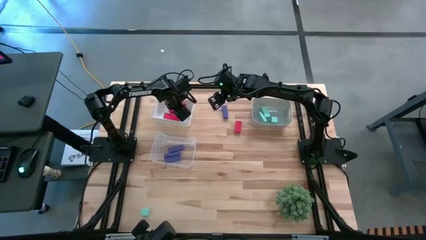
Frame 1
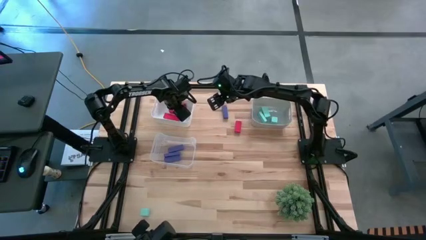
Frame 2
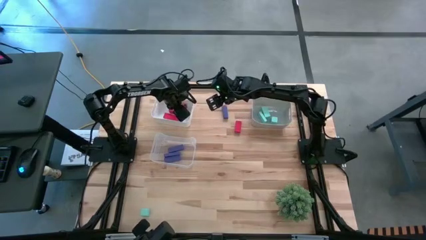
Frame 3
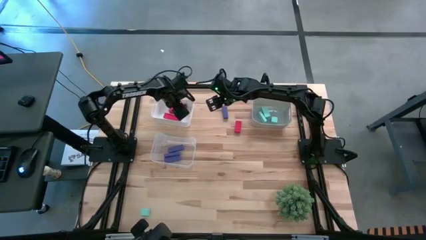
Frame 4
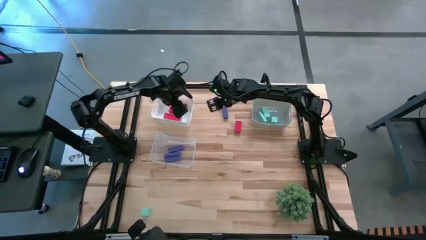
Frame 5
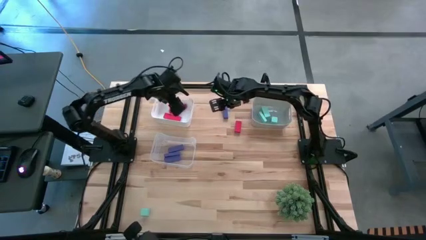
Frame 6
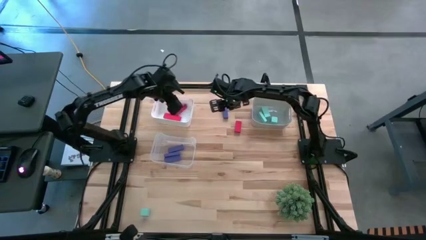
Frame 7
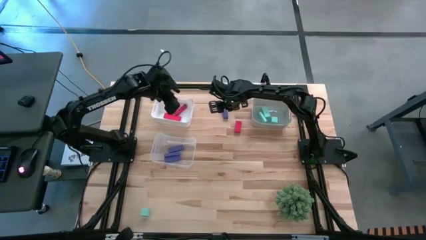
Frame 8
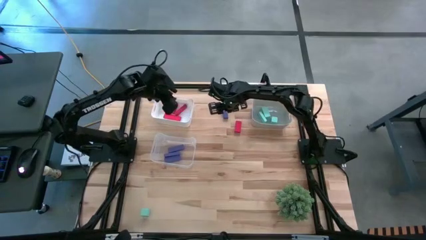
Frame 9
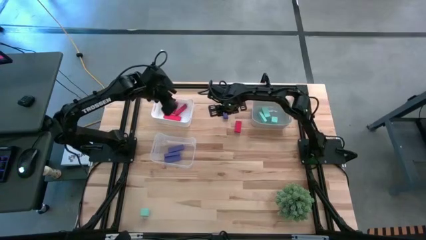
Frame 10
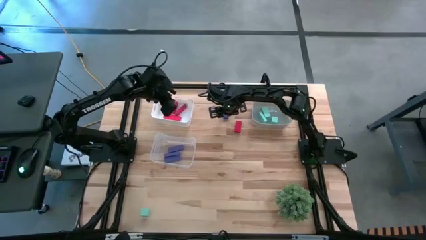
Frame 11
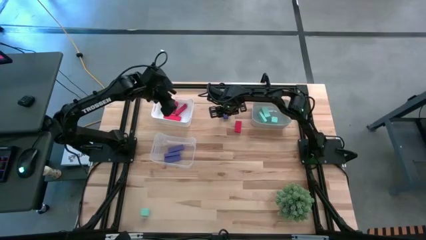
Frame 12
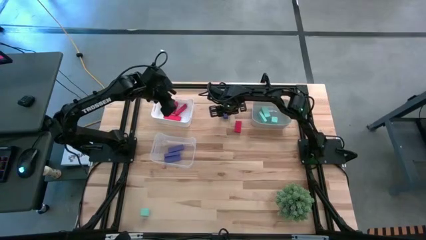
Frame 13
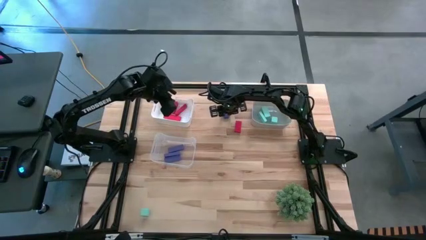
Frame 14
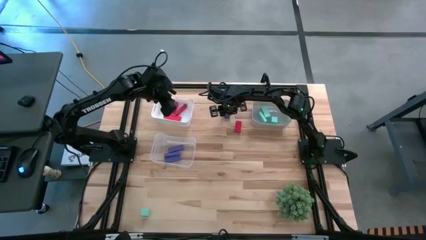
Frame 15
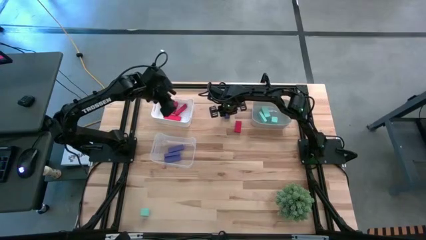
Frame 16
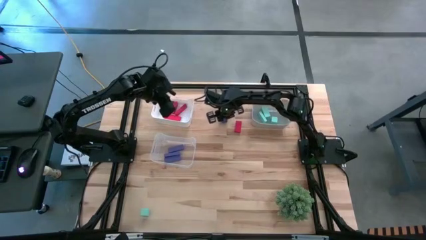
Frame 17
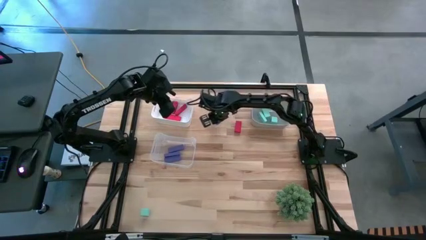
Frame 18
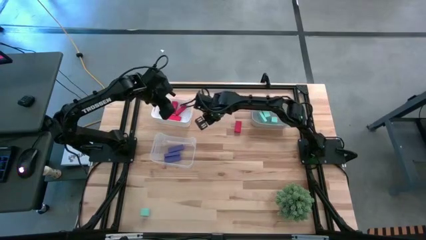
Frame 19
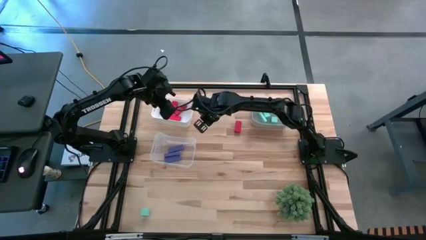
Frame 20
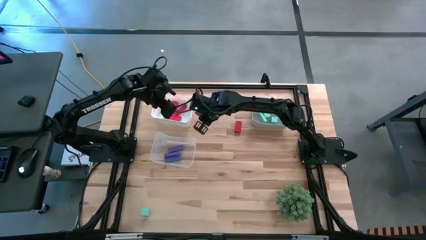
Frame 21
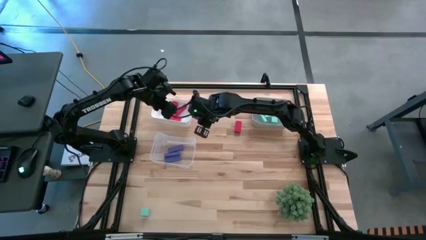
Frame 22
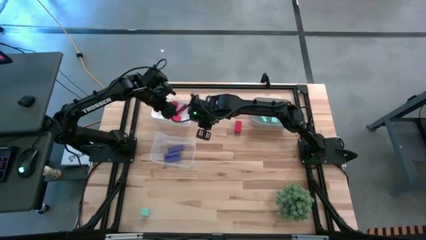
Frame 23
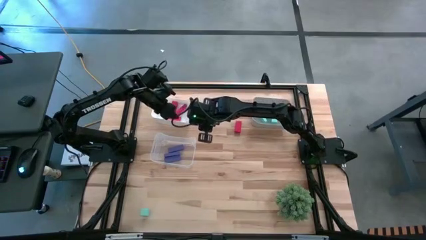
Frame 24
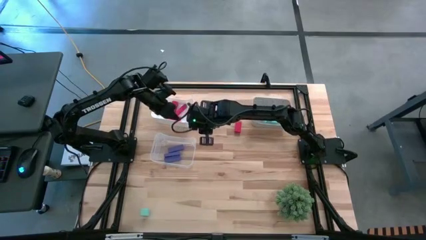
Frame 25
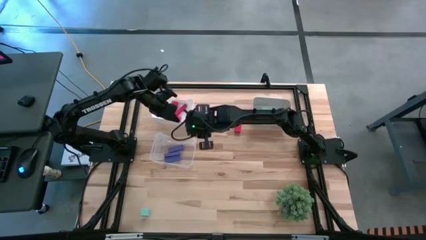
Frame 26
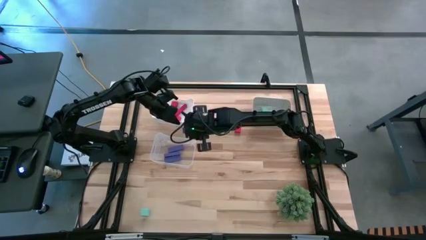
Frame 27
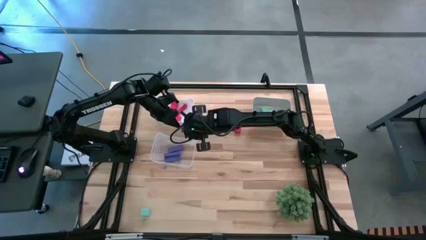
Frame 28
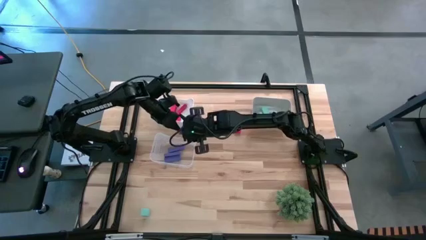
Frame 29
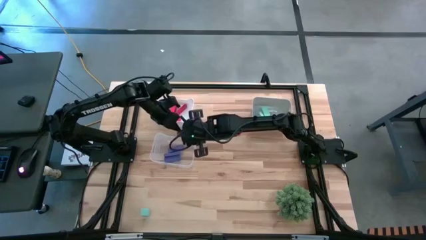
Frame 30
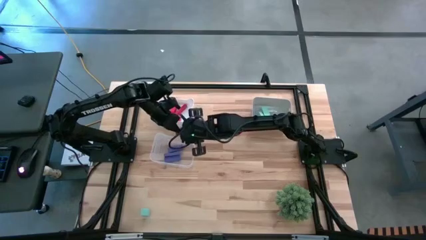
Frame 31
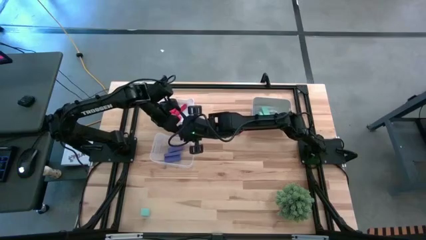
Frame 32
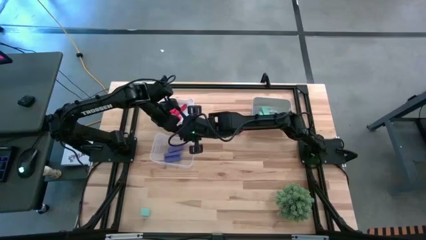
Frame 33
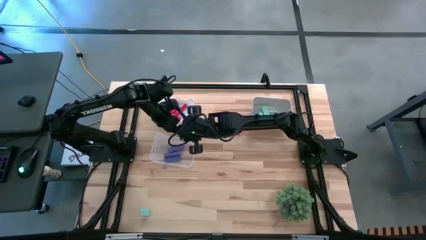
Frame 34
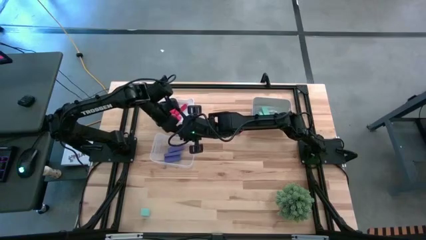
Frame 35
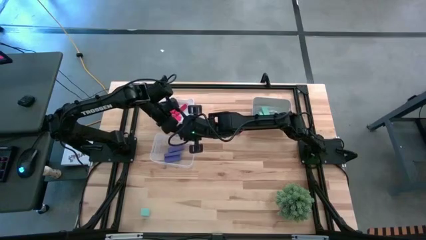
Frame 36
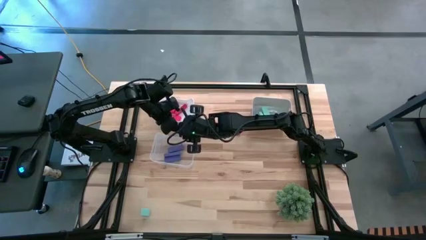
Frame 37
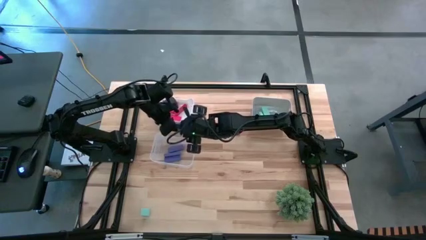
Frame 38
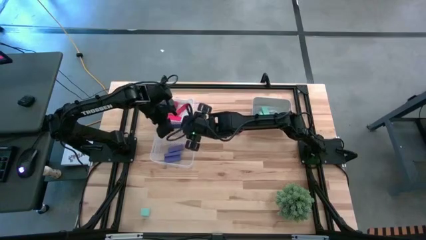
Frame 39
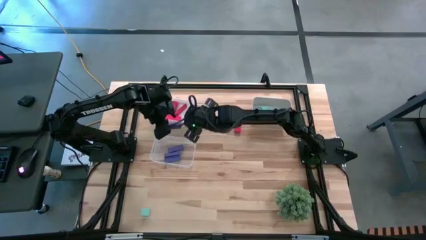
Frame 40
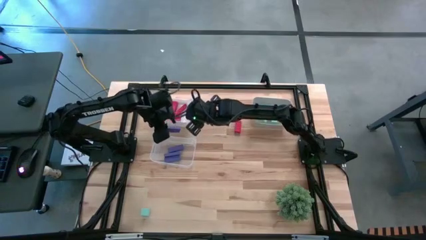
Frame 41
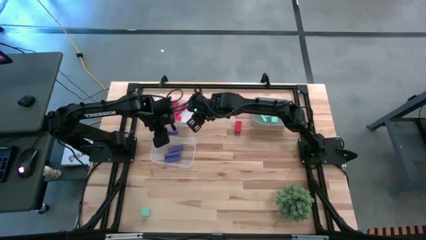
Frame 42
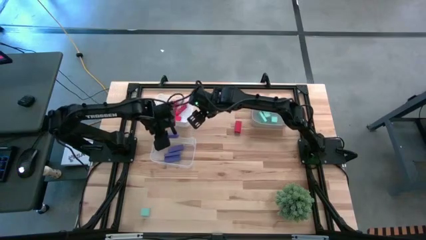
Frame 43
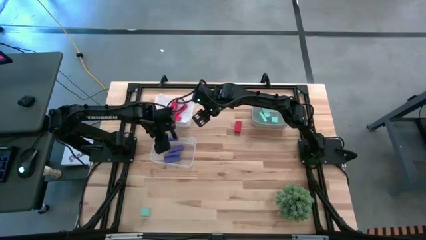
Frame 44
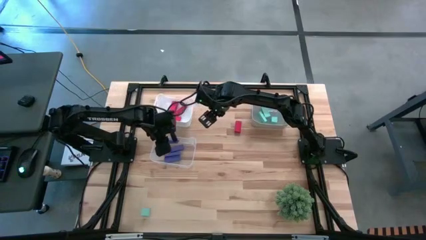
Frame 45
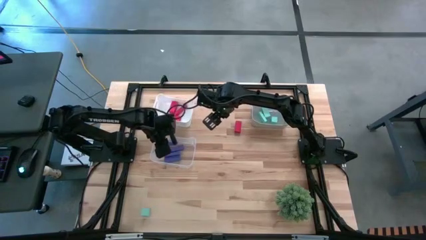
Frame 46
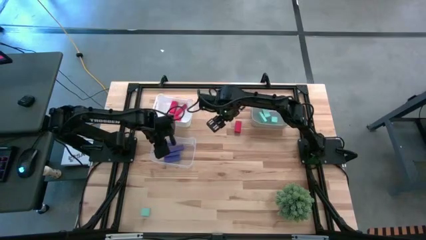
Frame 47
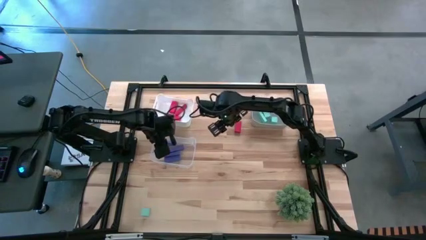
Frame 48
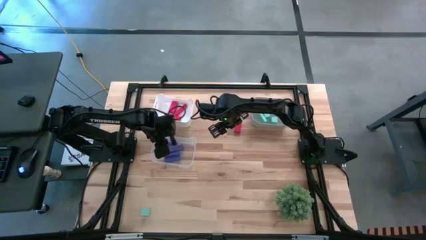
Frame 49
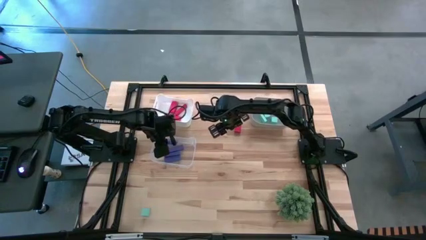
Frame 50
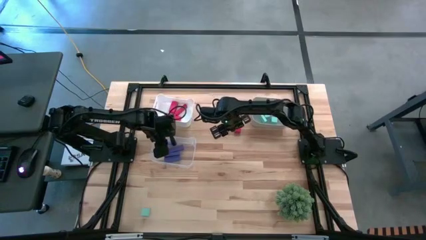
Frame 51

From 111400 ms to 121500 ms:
Task: Sort & place blocks by color
Put the purple block into the transparent bin
